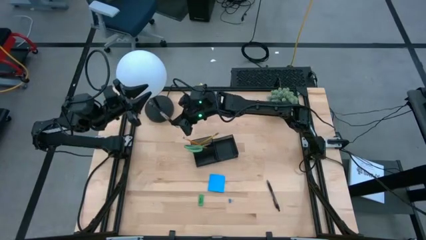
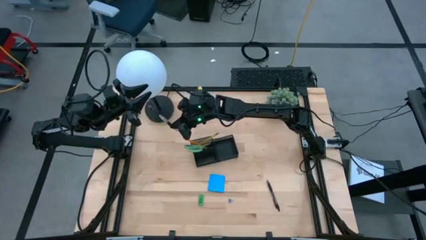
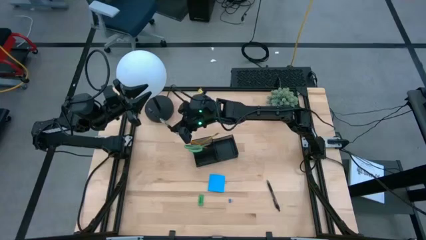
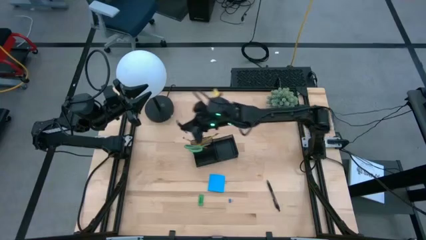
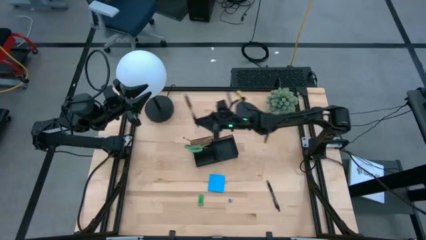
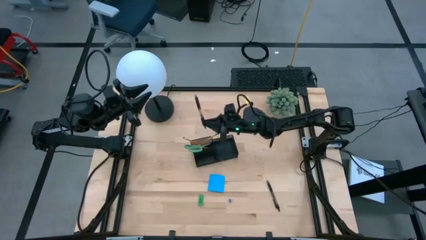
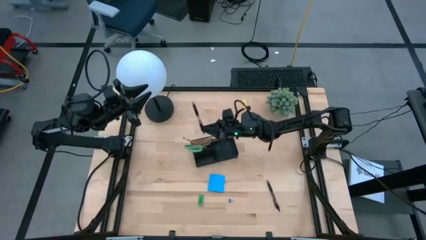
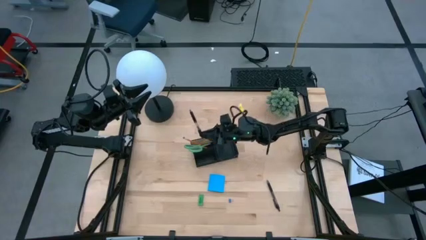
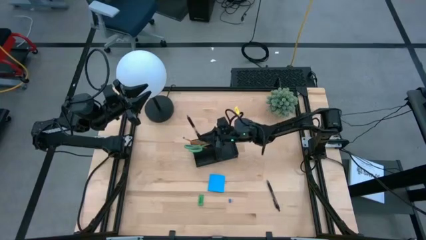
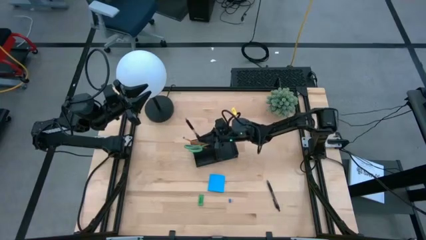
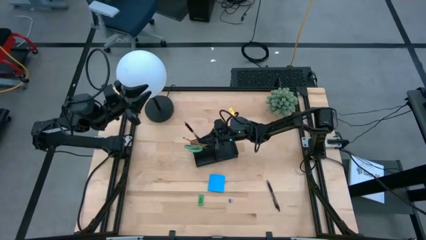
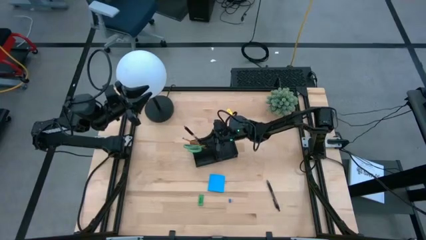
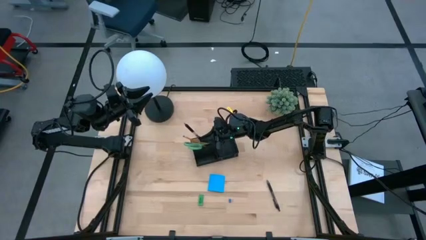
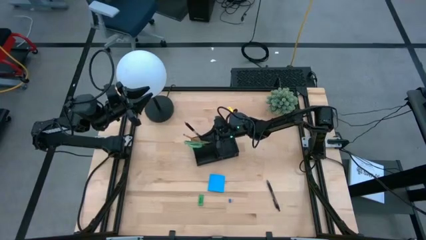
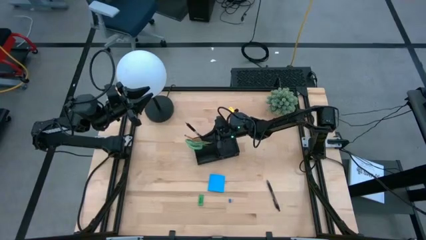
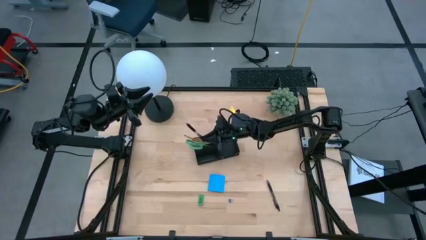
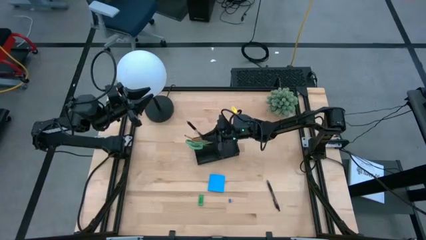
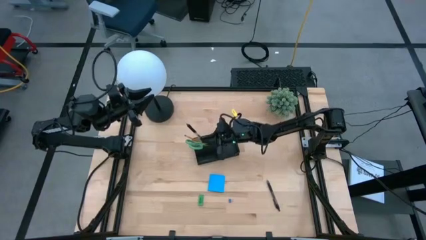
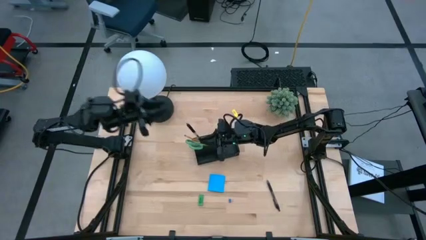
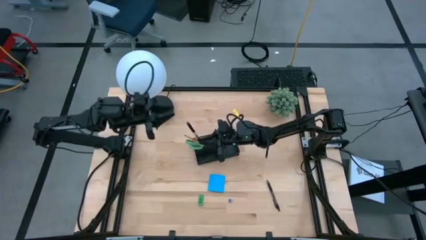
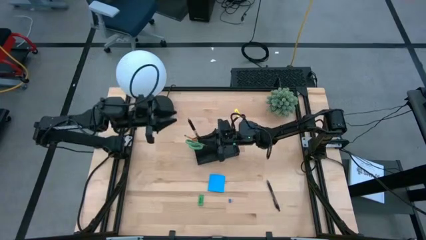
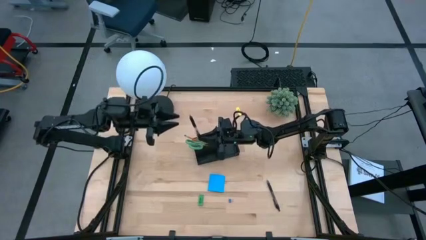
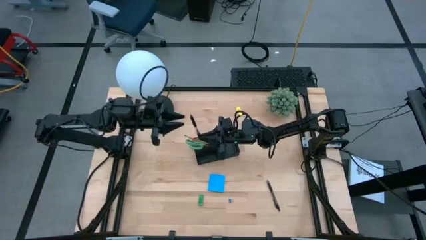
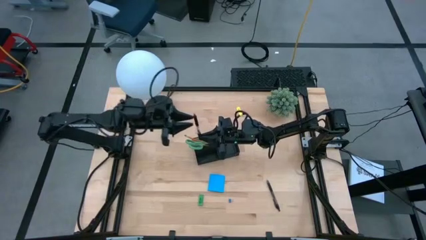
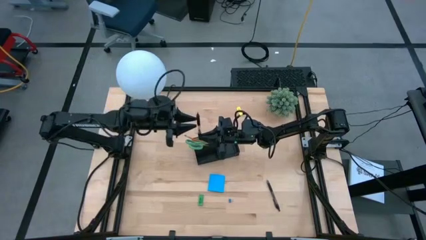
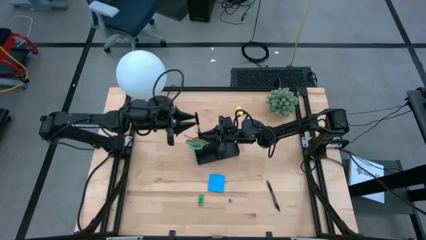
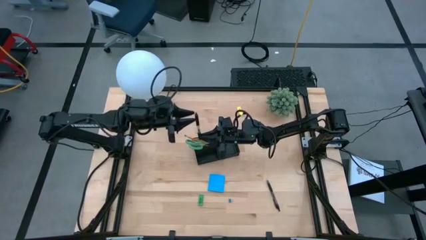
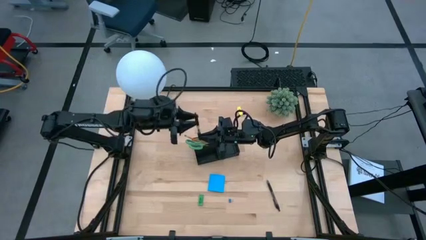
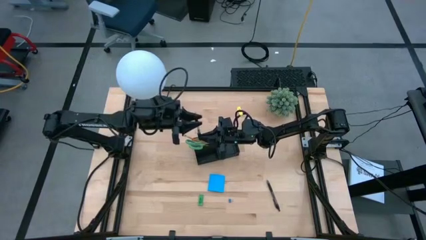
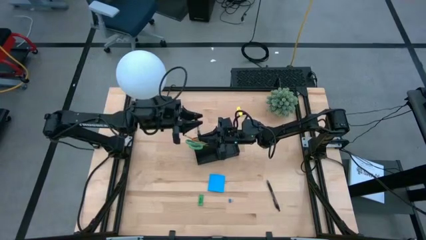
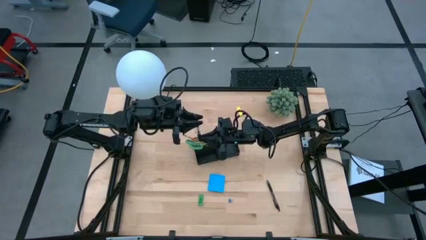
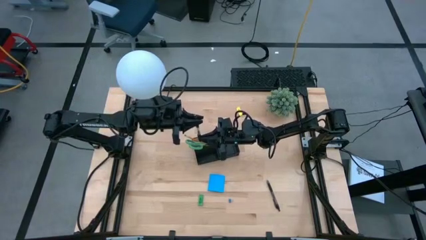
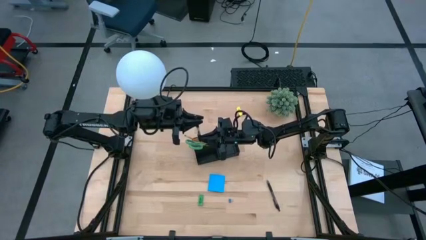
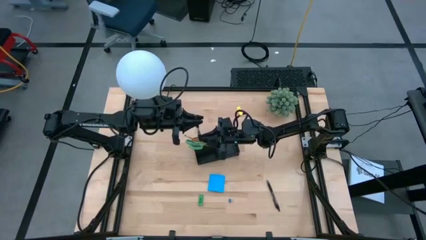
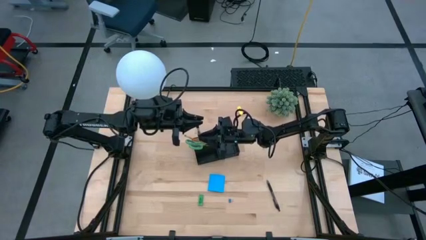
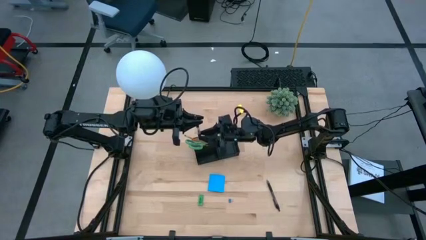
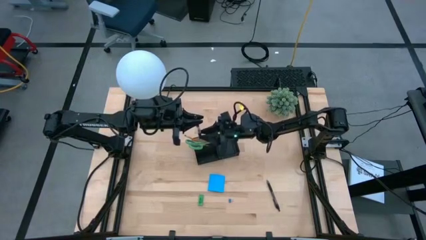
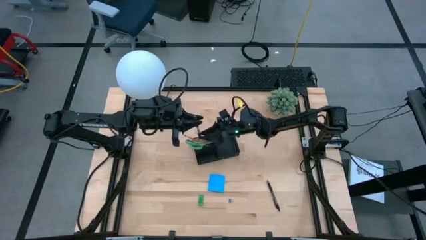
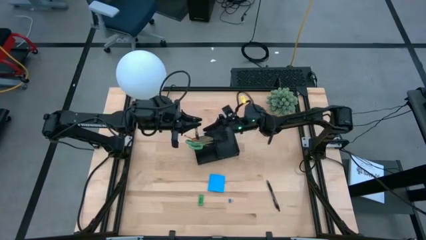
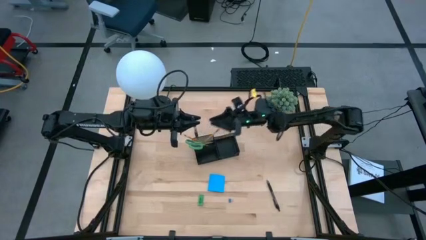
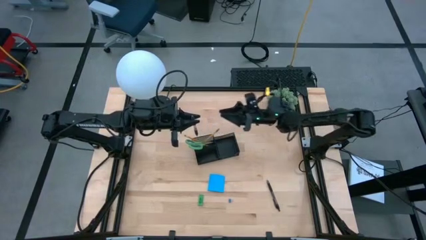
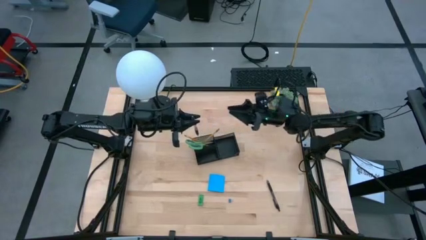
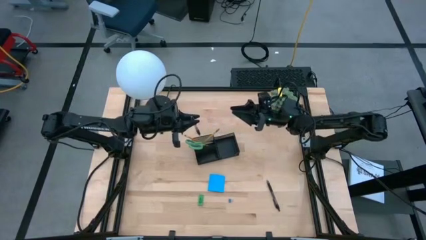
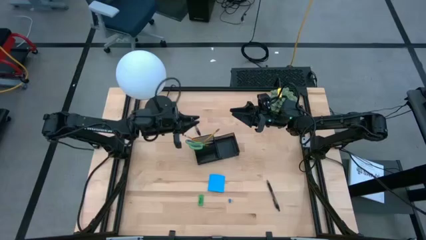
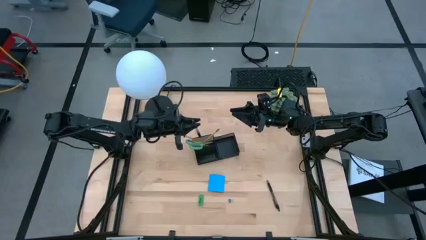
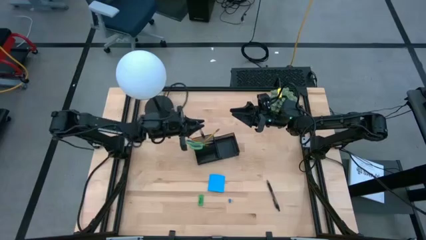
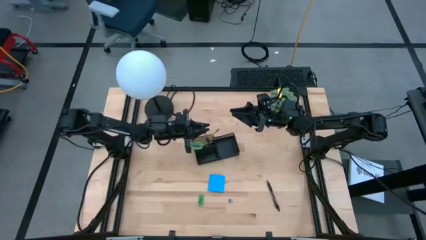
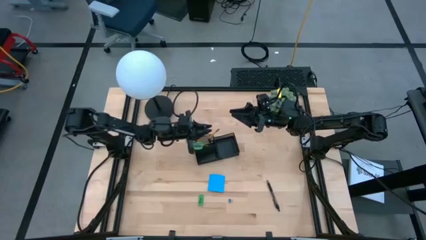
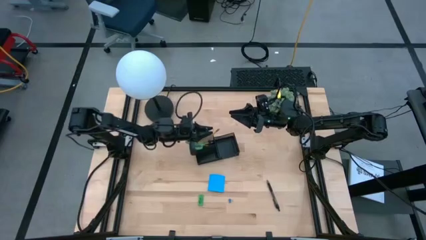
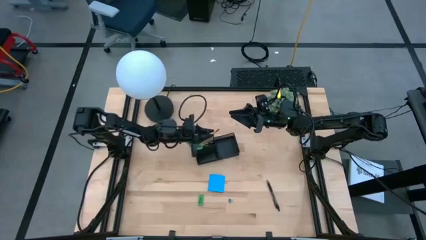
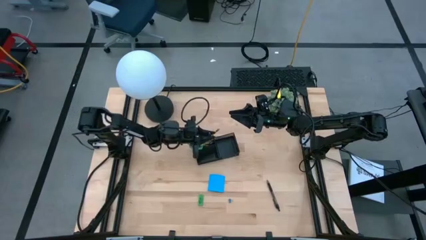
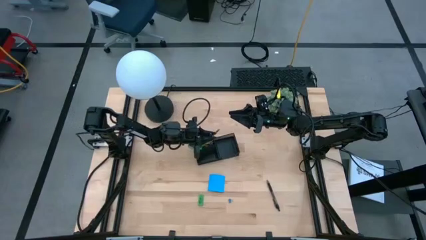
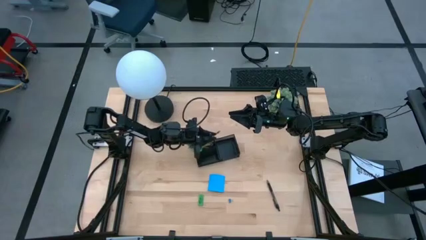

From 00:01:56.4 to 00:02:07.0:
Task: Pick and place office supplies into organizer
Put the left black pen into the black desk organizer
